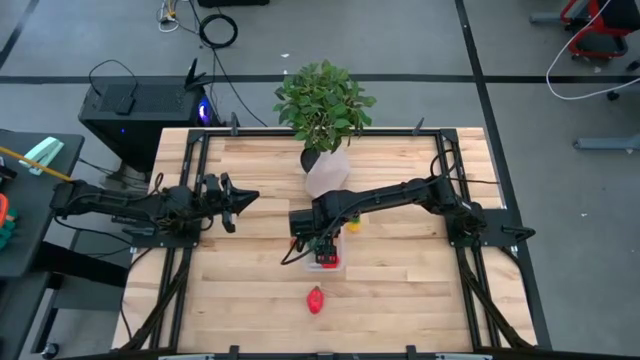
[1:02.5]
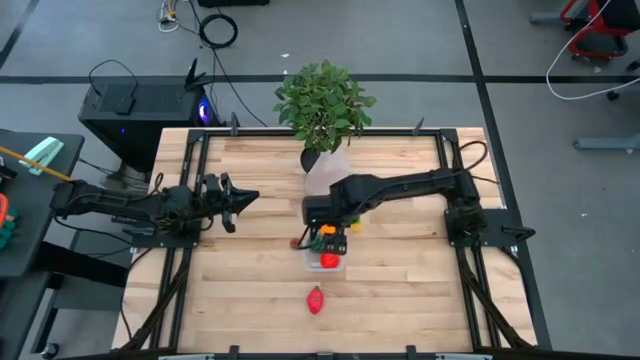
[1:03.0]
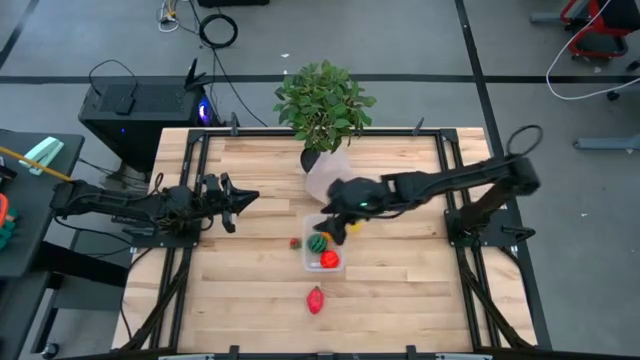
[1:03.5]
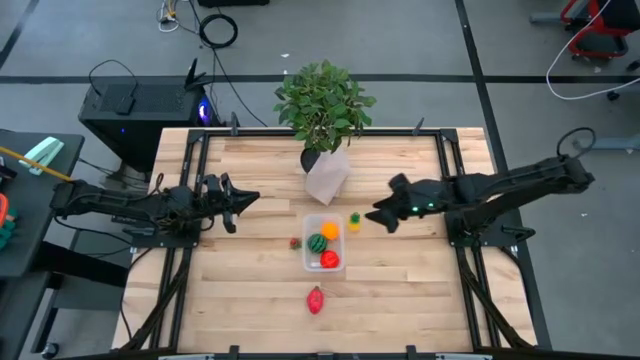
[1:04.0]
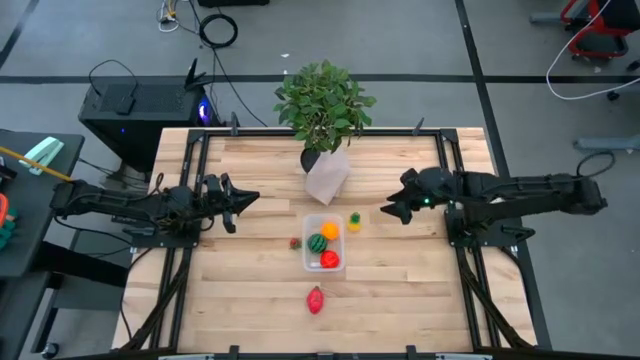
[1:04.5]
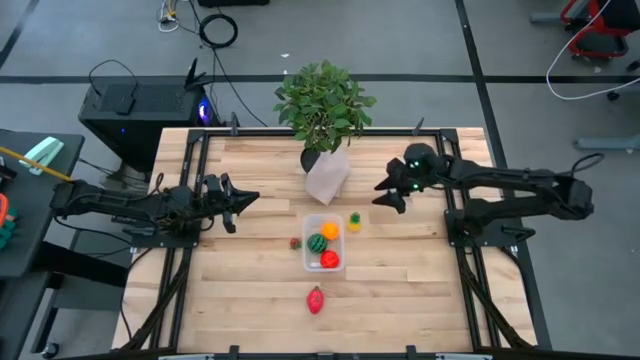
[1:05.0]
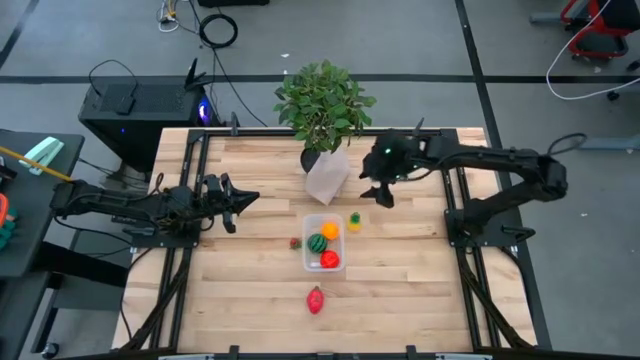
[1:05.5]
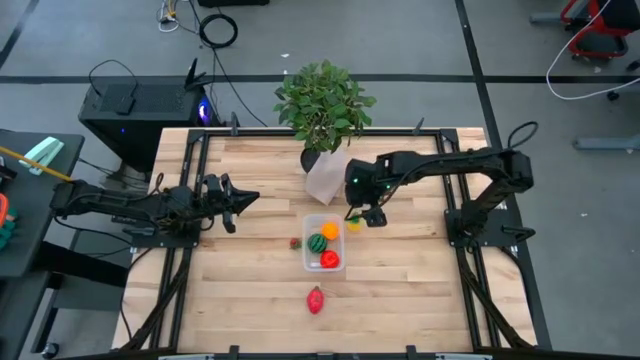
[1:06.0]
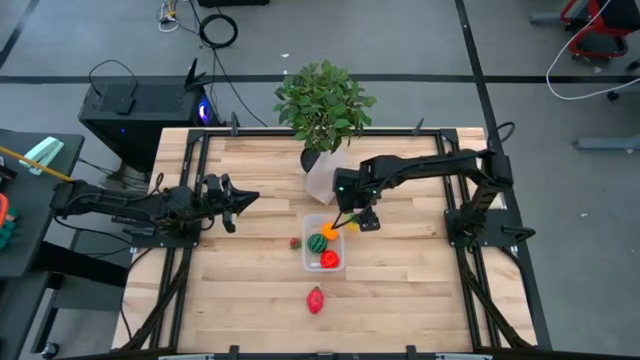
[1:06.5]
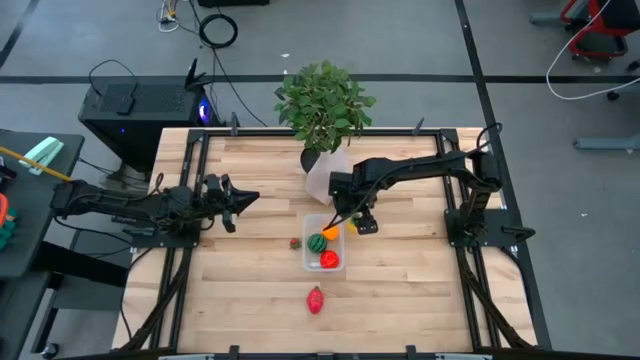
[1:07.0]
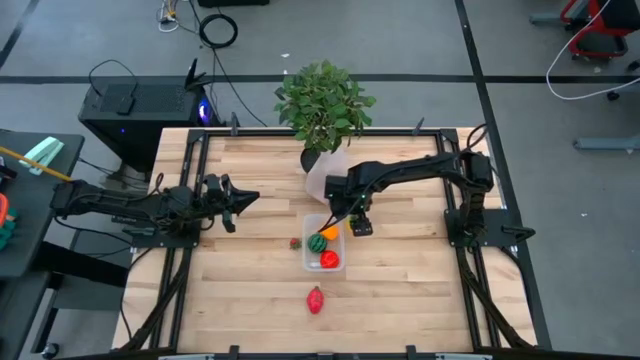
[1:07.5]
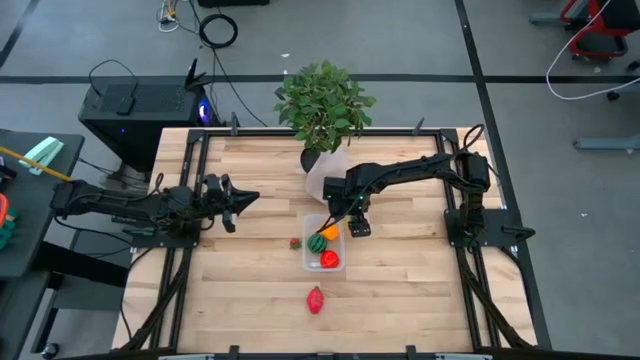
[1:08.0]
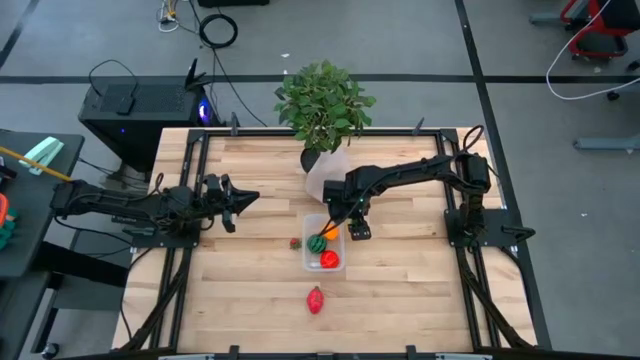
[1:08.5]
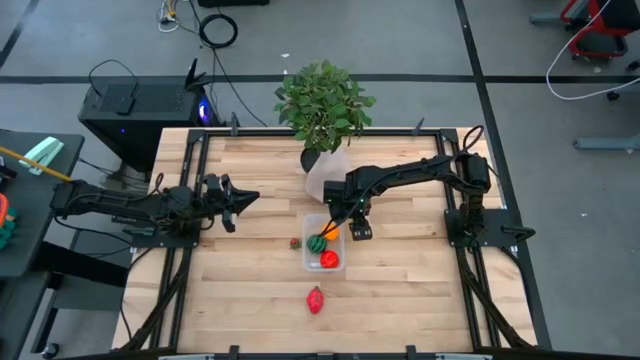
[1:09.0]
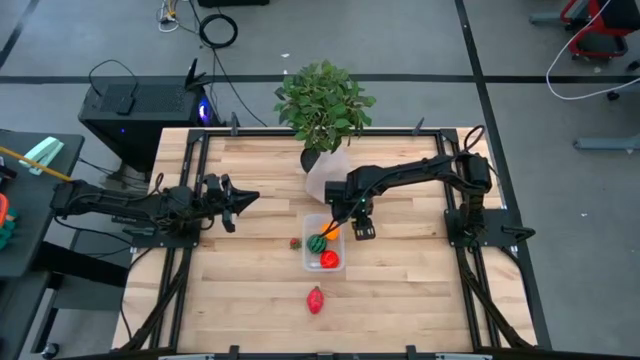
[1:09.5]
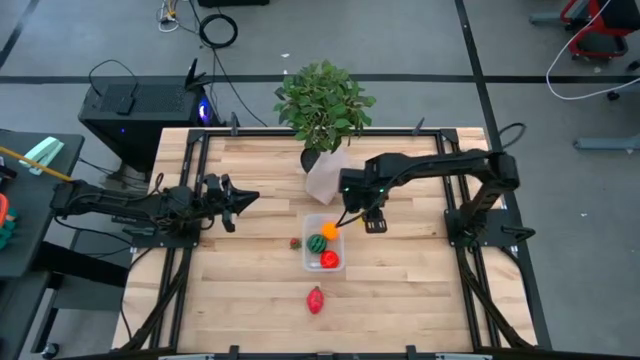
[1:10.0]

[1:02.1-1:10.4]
Task: Pick and placing Produce into tupperware
Put the yellow pineapple into the transparent bin

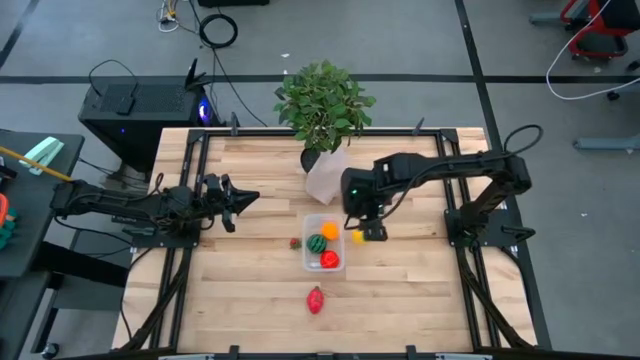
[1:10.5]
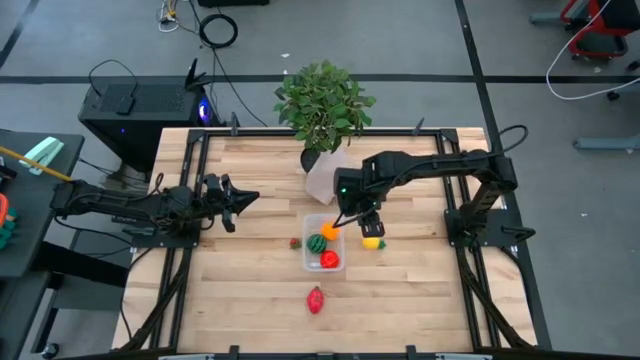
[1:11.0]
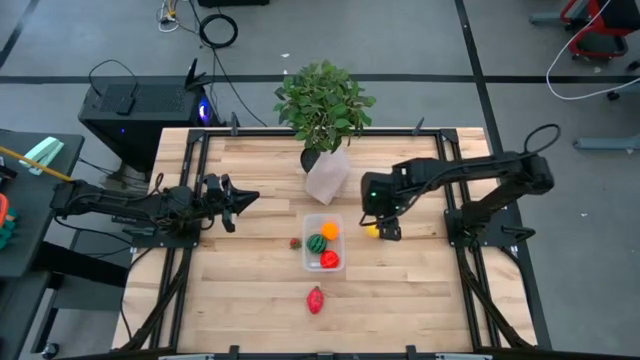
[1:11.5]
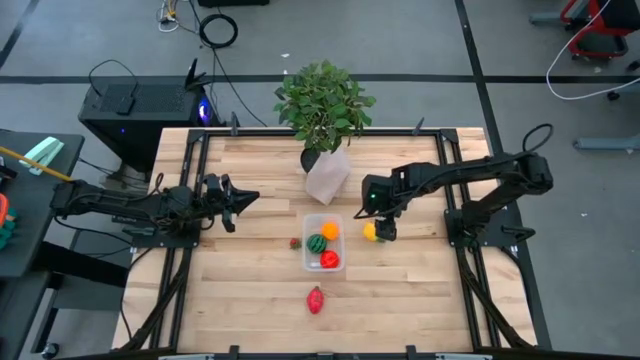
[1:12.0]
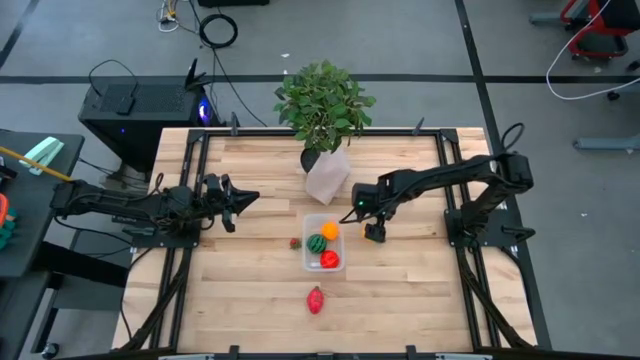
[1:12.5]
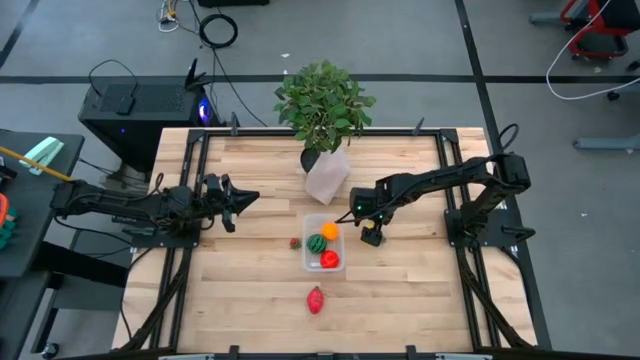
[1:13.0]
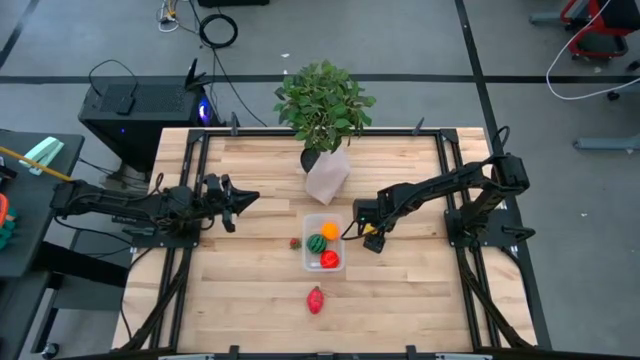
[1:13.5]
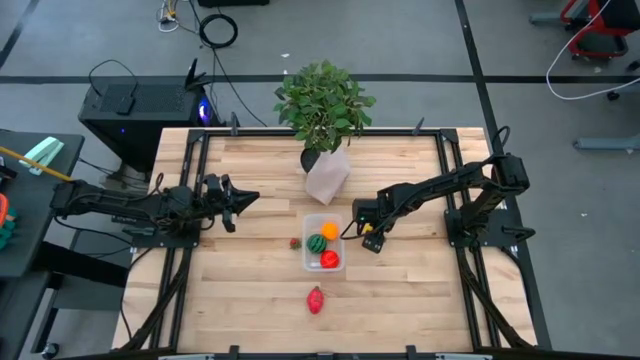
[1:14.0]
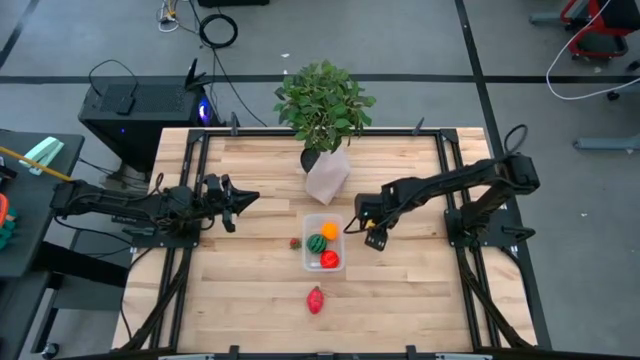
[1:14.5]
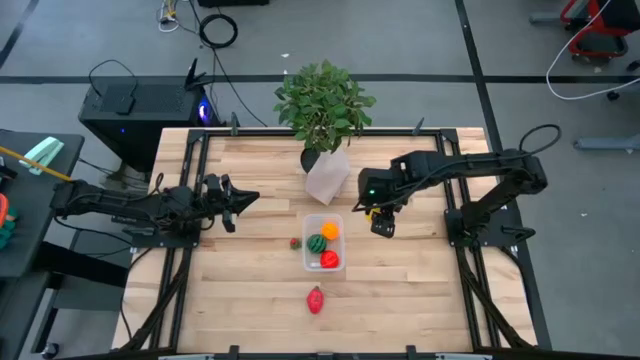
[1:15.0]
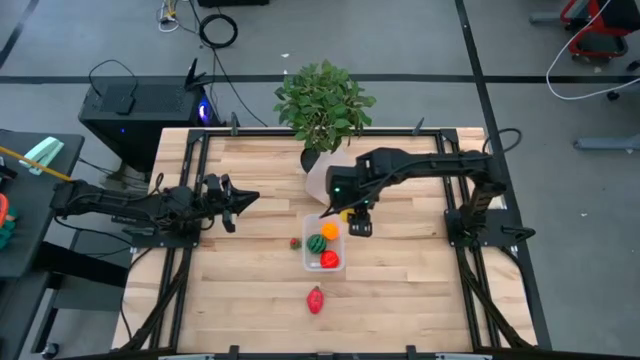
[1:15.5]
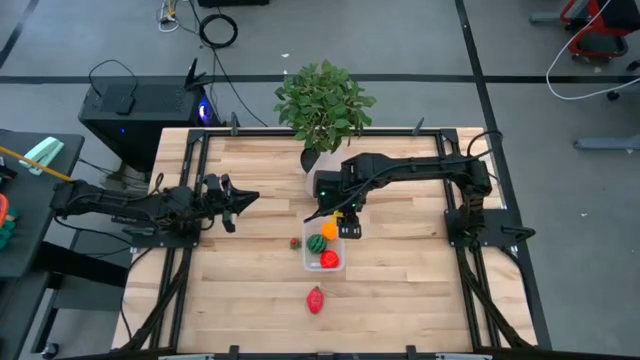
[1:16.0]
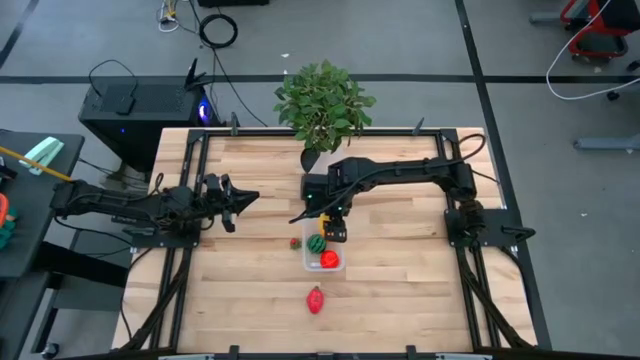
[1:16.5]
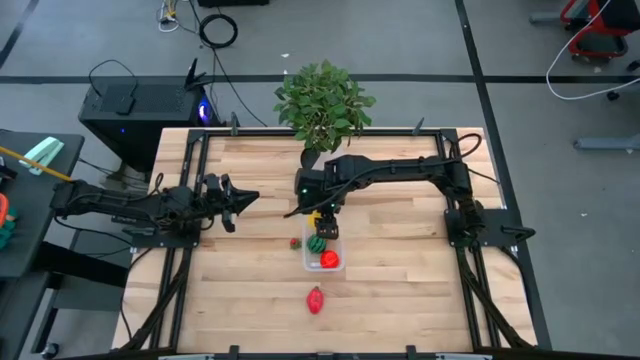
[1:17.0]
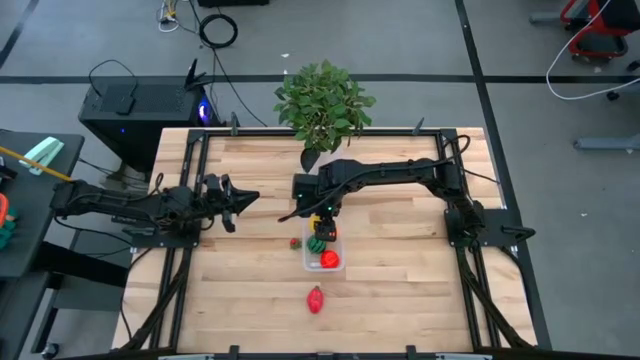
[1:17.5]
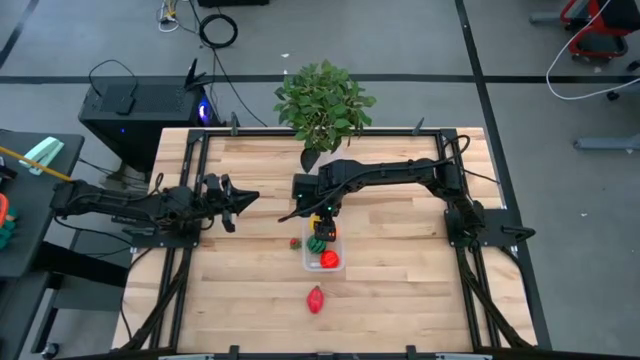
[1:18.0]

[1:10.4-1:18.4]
Put the yellow pineapple into the transparent bin
